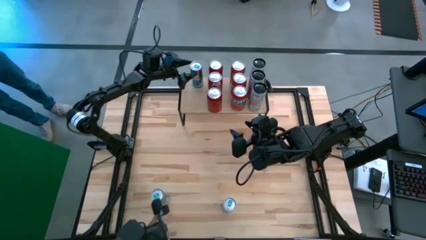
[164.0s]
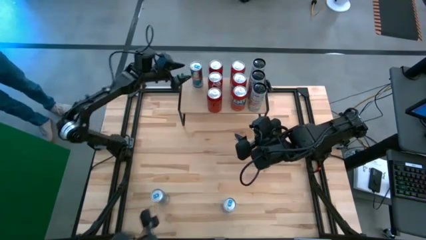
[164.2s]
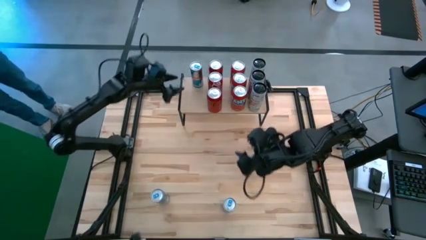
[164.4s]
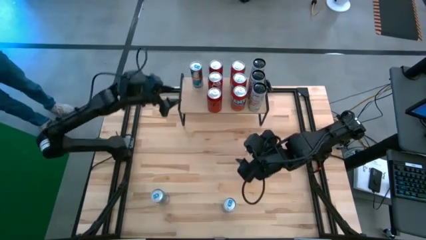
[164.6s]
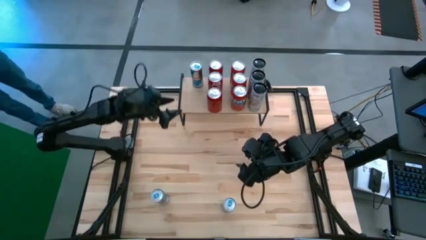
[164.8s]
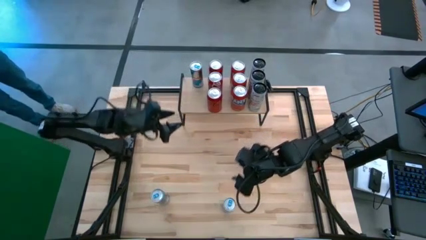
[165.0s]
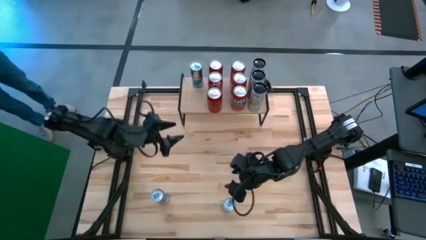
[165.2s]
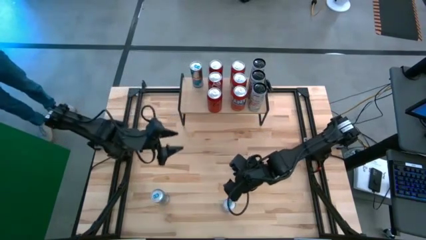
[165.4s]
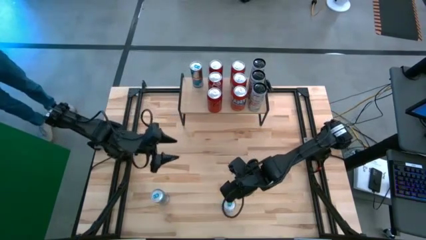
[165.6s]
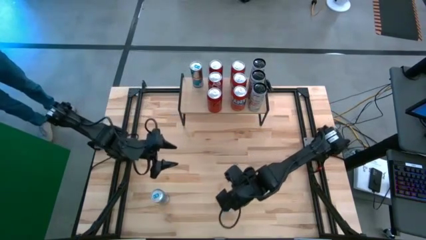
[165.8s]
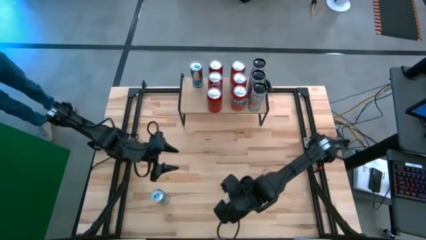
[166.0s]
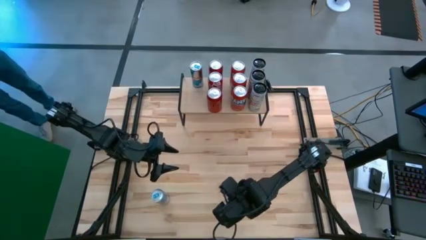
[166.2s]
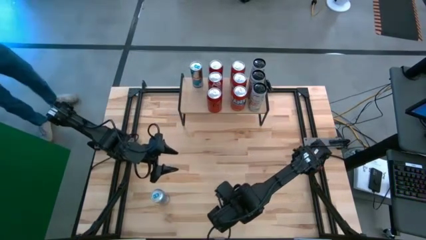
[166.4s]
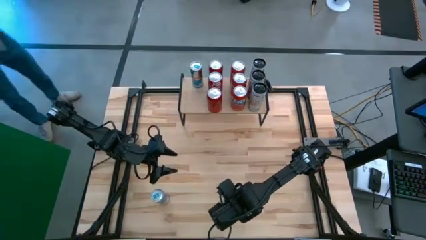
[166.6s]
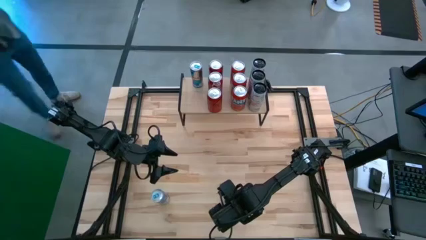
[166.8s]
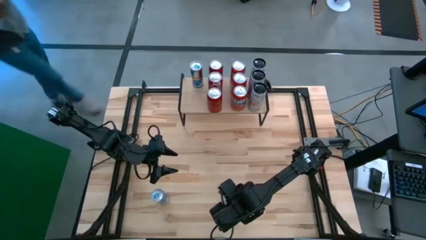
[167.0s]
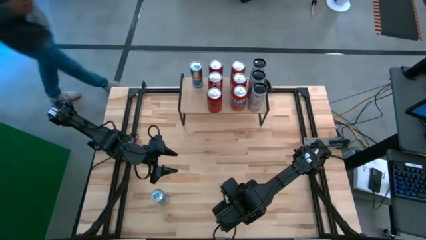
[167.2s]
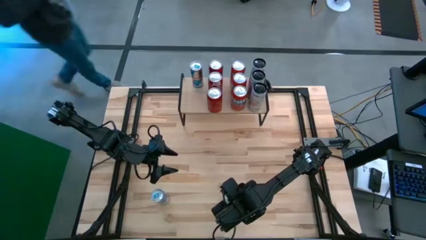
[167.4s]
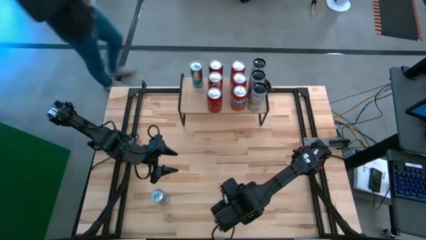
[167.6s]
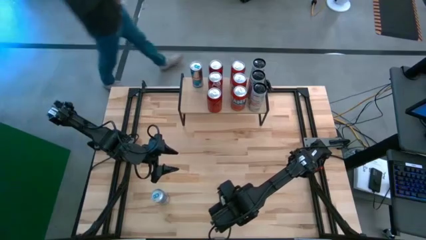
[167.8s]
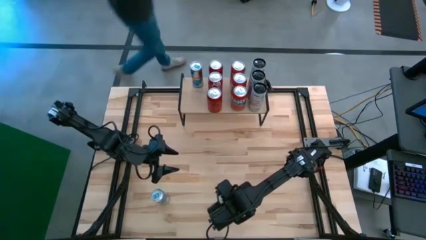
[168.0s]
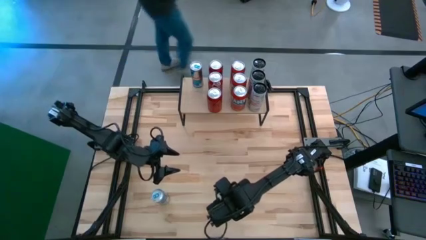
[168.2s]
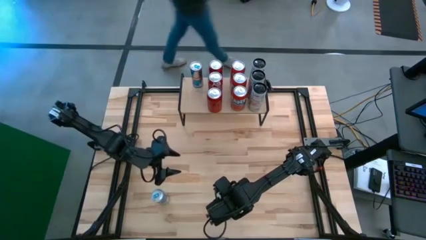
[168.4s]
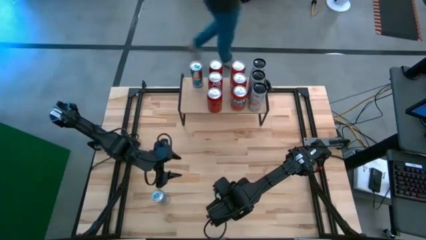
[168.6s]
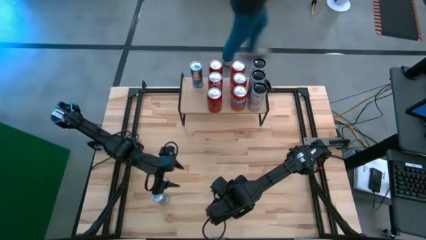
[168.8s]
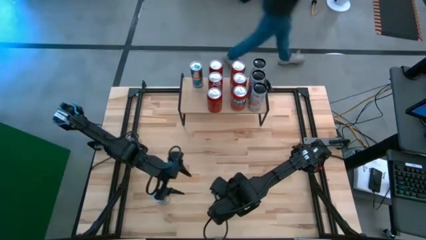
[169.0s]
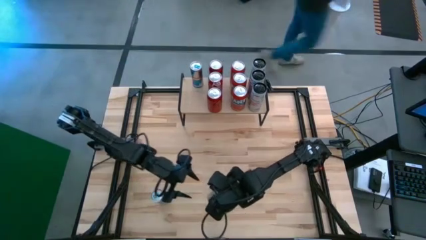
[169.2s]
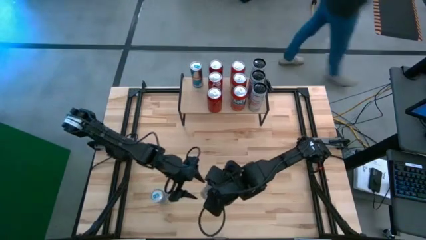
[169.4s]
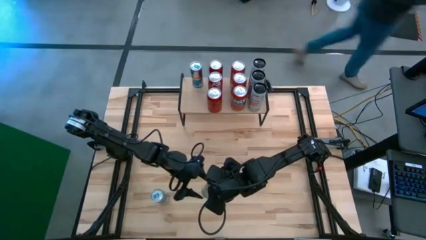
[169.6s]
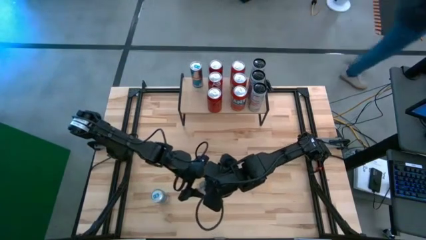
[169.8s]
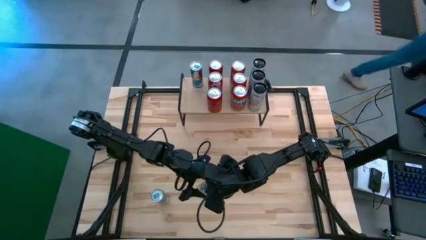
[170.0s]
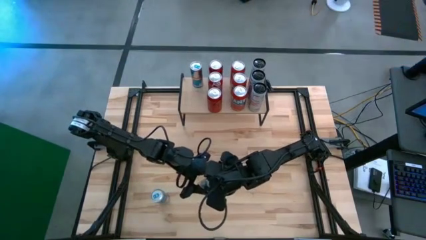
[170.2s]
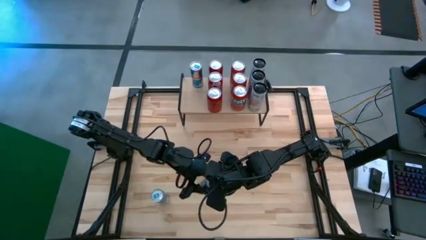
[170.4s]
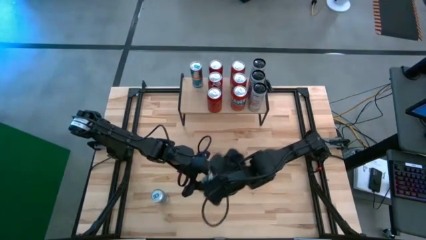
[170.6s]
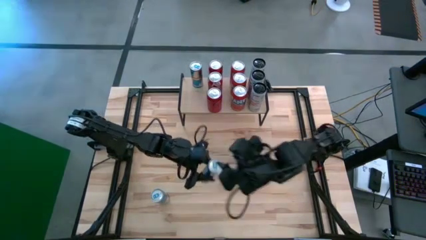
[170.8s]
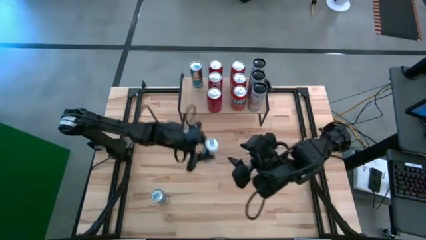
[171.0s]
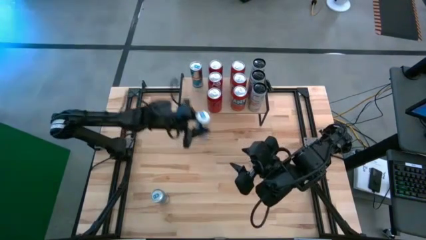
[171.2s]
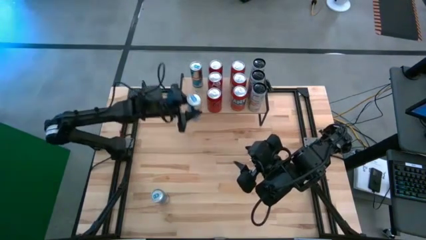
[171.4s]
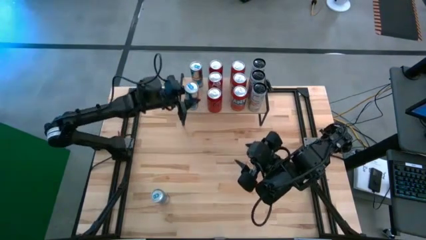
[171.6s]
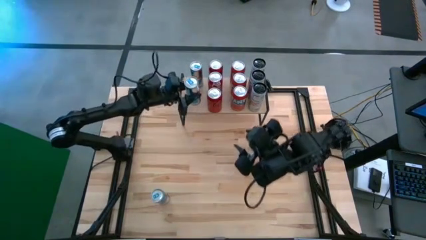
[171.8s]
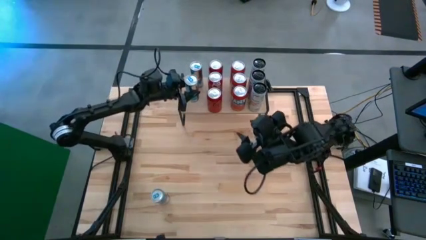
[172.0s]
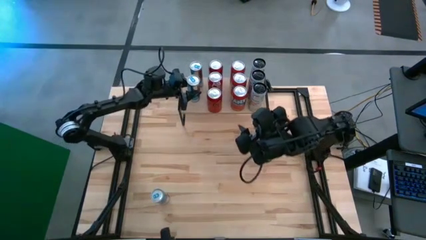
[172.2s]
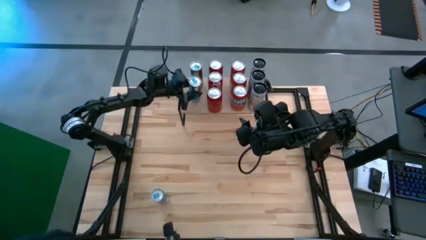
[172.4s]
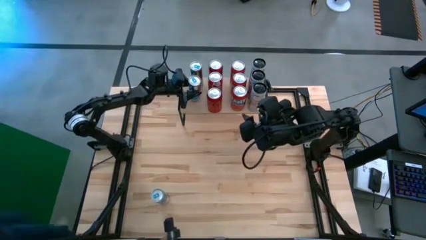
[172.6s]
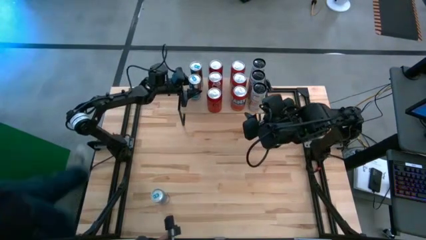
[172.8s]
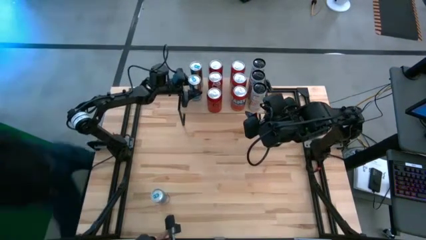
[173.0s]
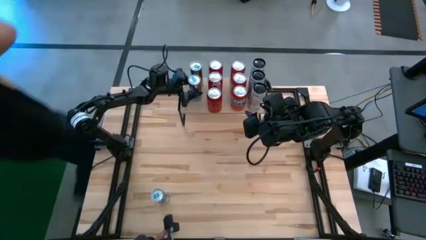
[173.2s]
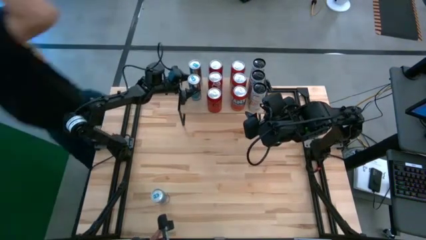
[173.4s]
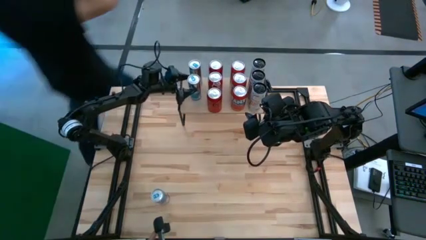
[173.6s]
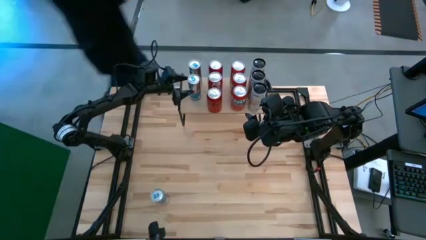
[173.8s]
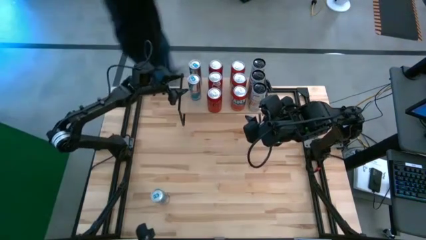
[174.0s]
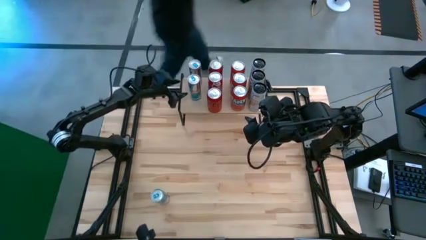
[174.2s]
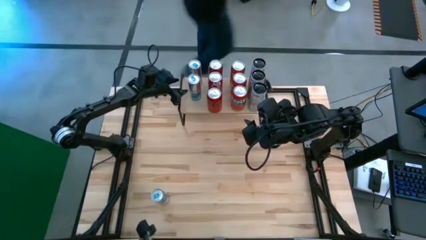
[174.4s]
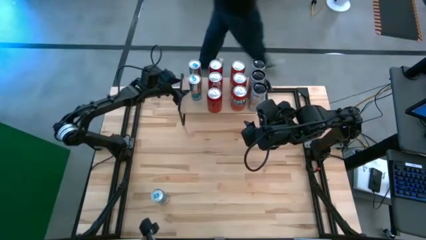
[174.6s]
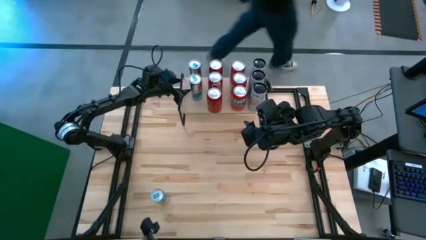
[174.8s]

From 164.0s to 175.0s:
Task: Place canned beverage on shelf
Put the right blue soda can aligned with the other blue soda can on the shelf

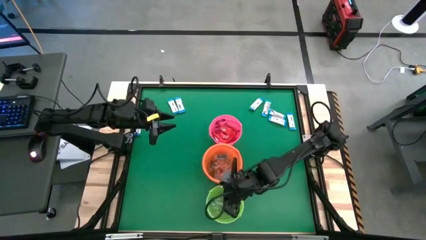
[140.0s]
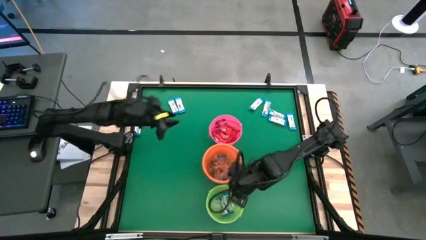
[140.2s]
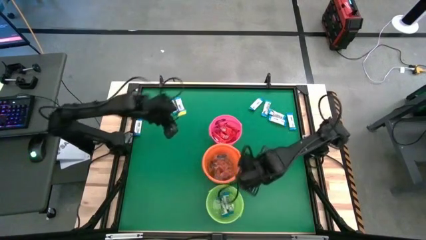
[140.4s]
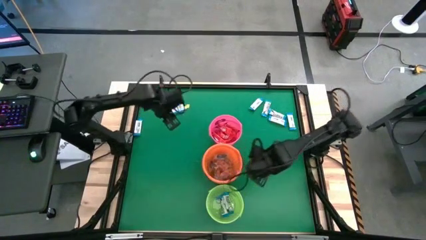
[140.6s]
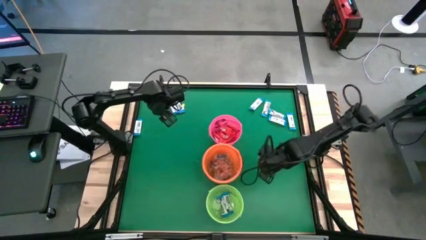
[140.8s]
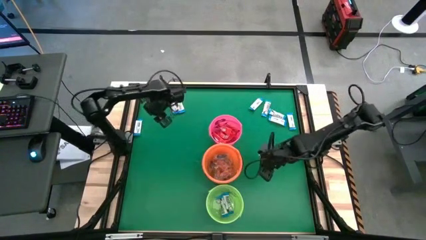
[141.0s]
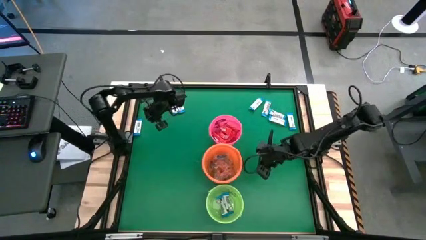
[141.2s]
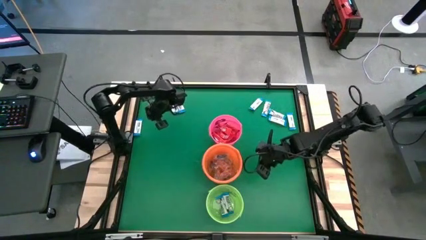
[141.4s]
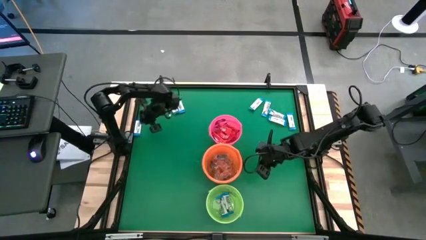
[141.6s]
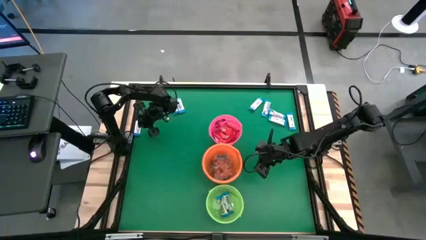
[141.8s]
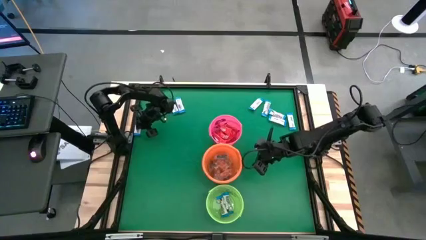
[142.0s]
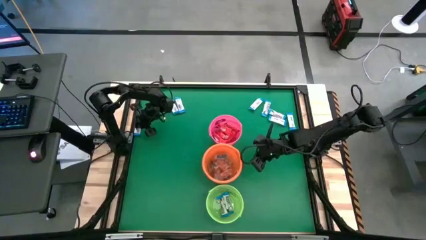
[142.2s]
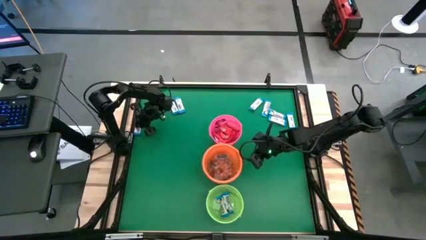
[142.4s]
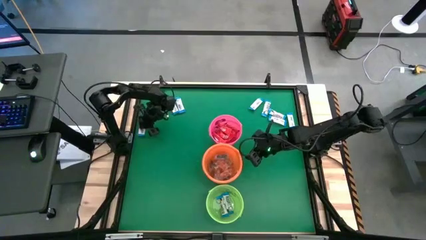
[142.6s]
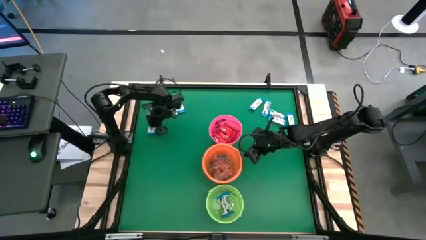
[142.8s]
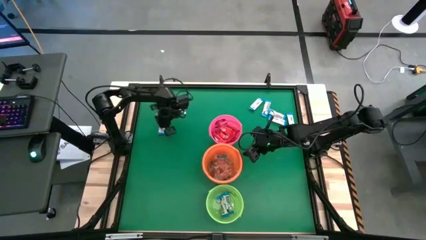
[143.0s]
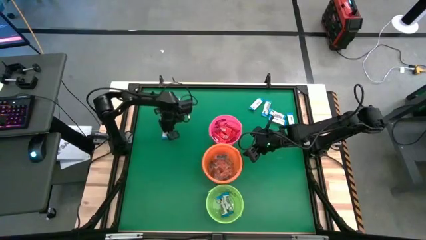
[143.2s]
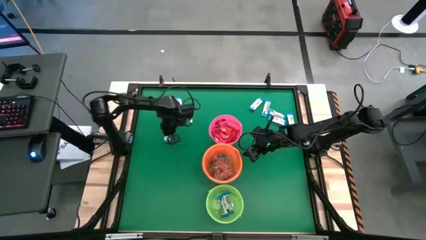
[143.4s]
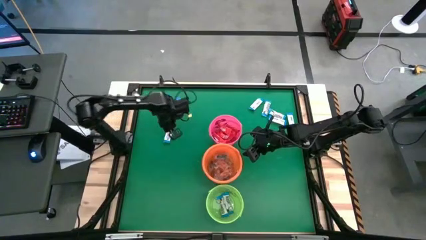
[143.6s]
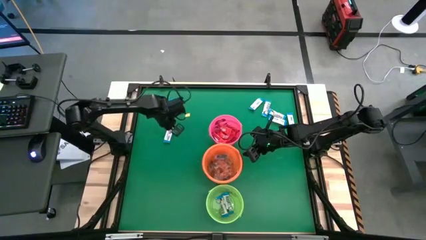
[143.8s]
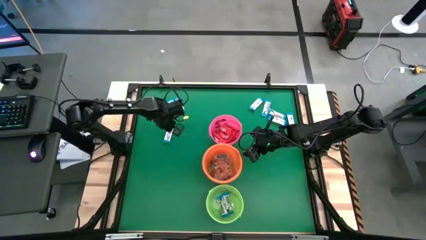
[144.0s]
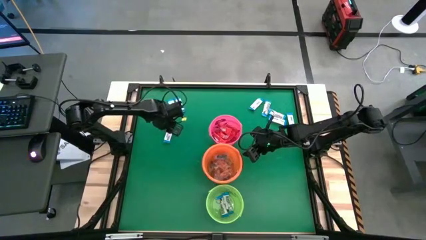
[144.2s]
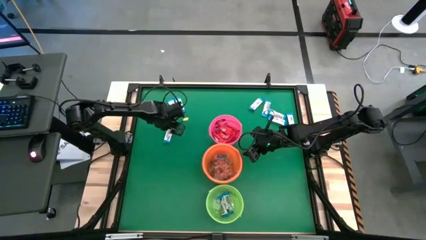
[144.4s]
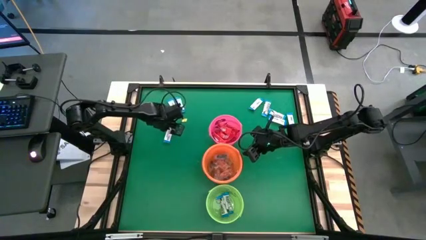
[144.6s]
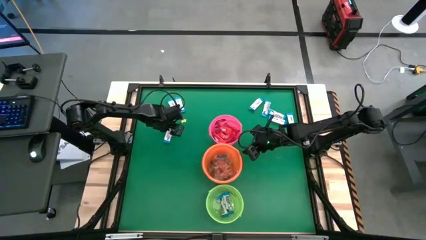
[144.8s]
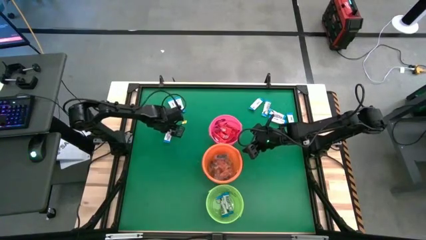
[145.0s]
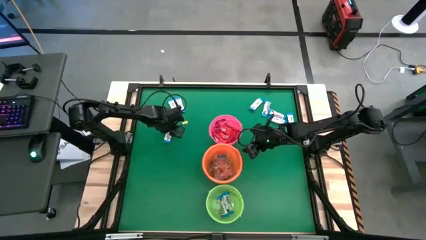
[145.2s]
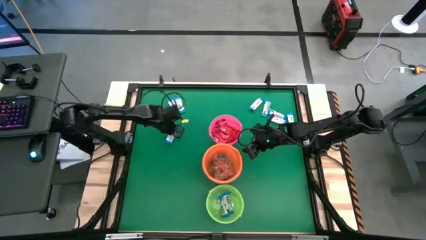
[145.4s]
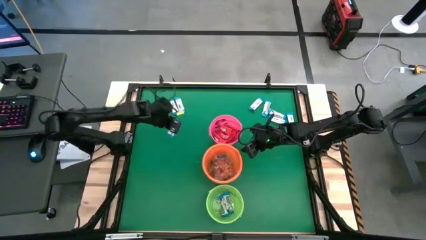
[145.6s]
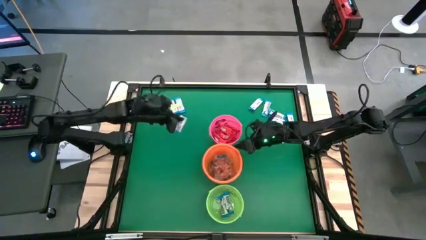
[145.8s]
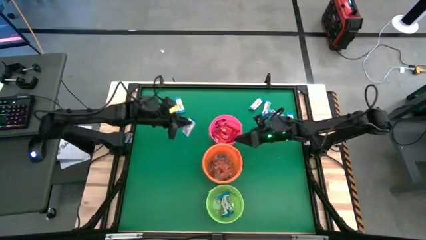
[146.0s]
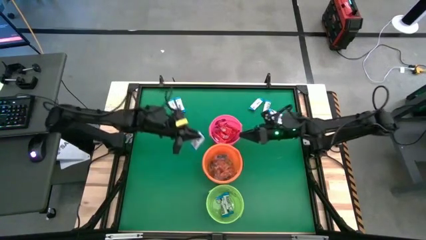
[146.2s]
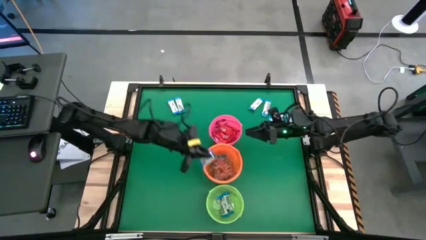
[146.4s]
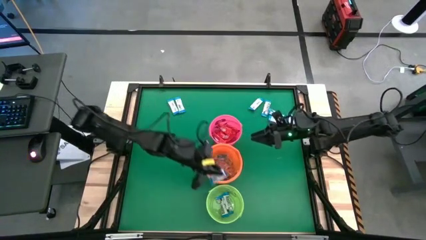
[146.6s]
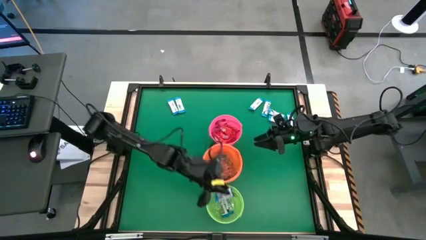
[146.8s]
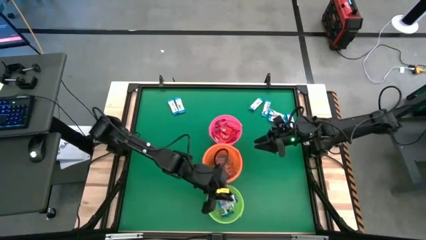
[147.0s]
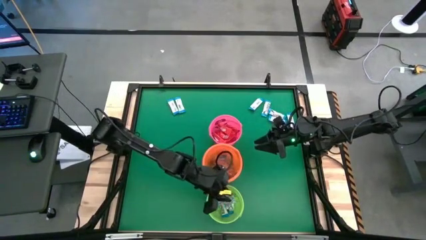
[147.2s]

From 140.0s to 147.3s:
Task: Sort candy by brand, put in halloween buckets
Put the white chocolate into the green bucket
